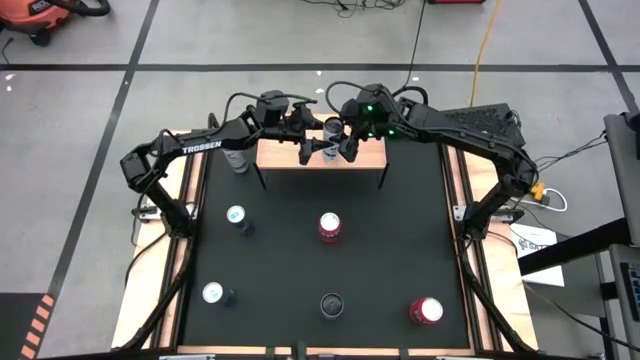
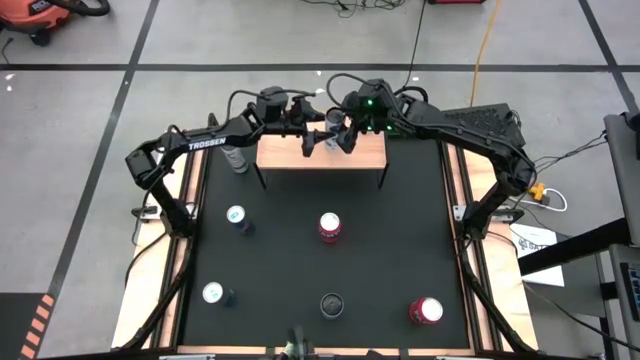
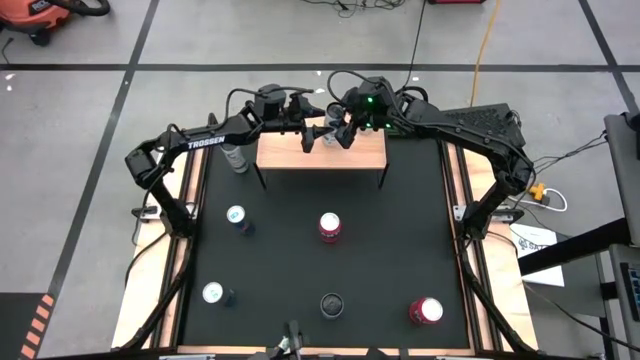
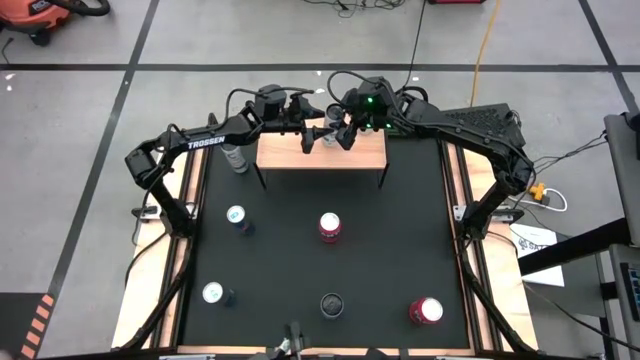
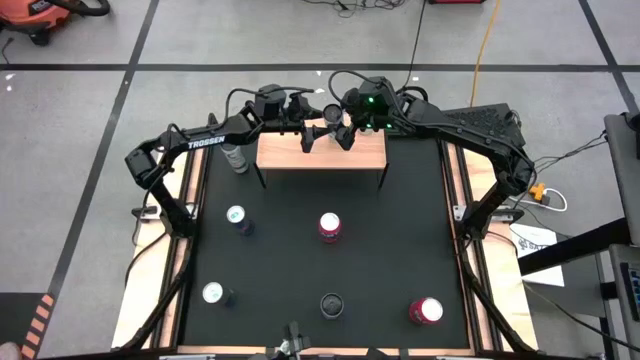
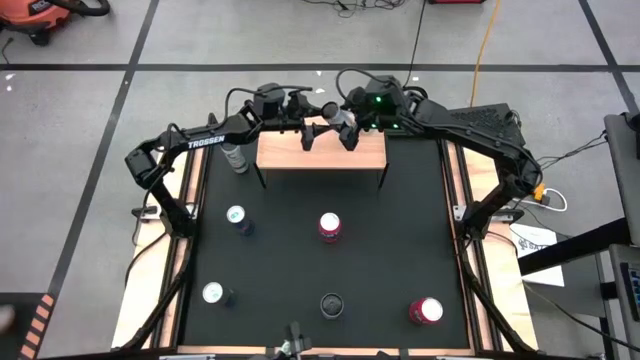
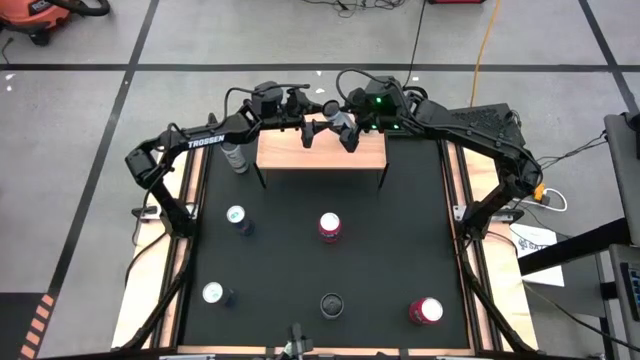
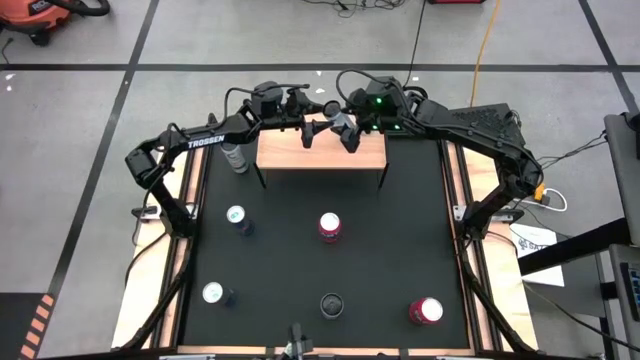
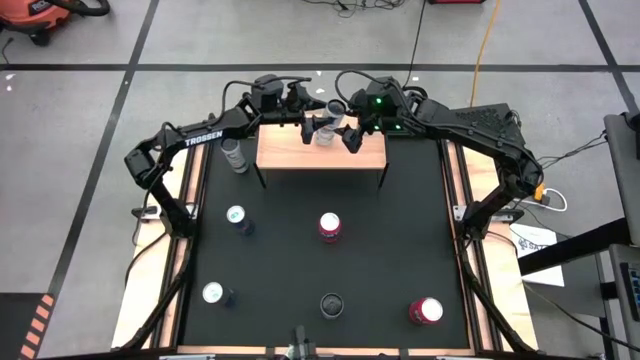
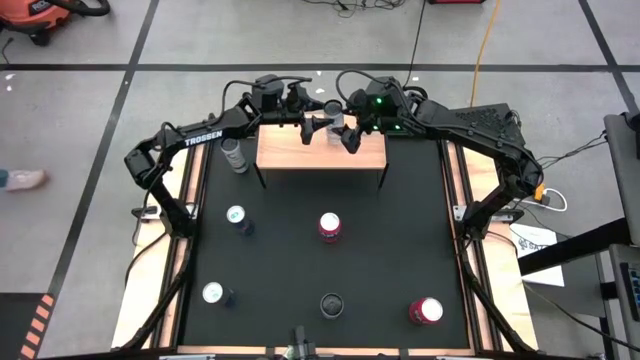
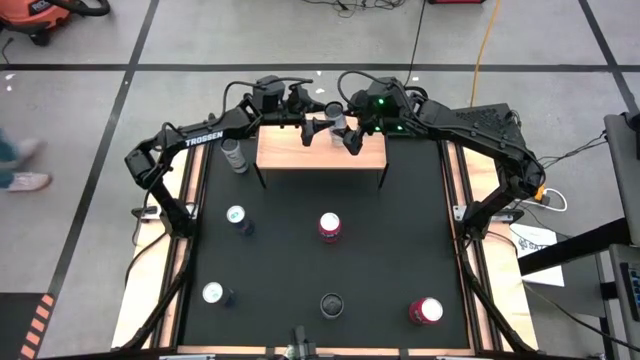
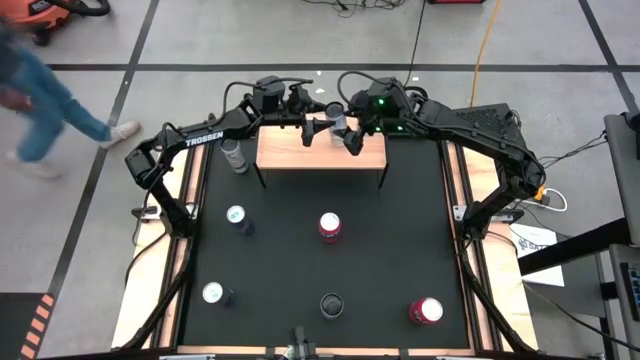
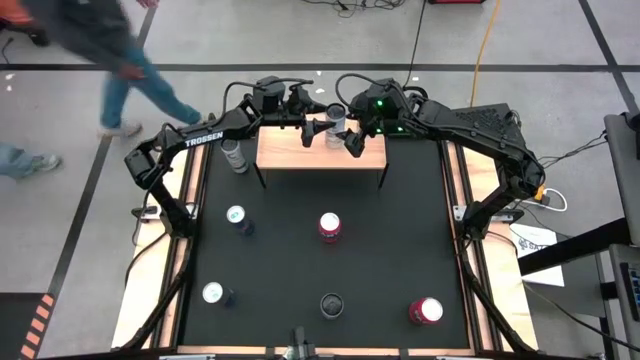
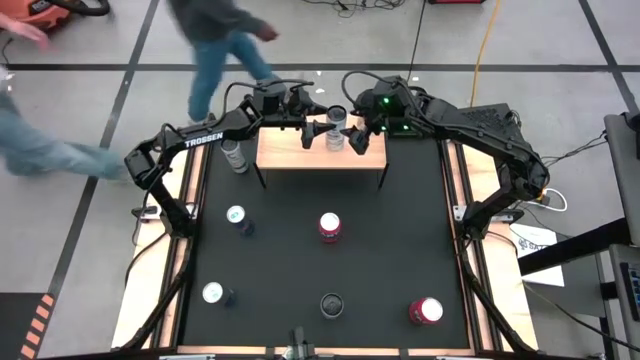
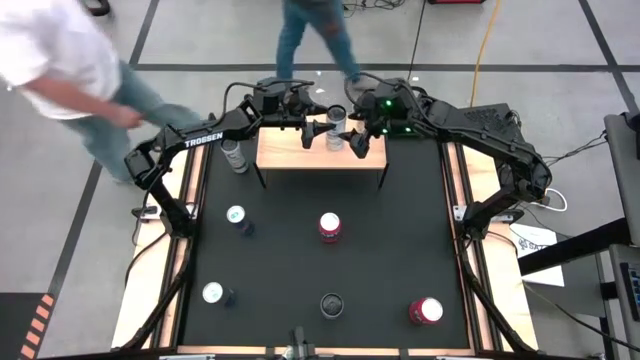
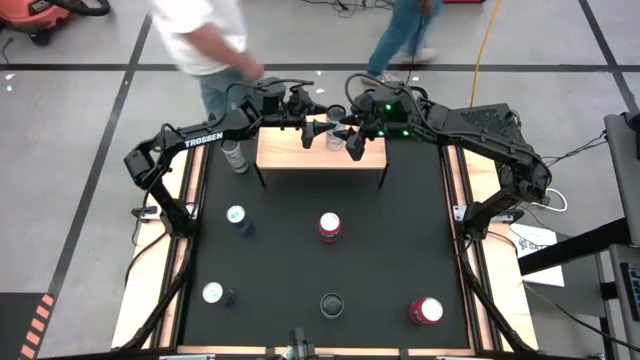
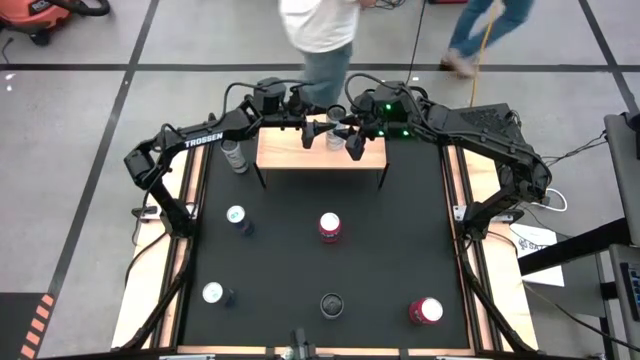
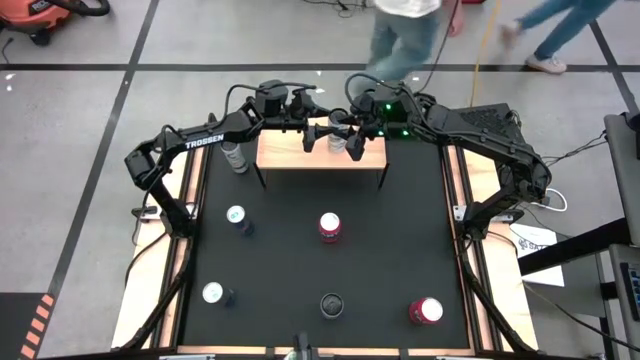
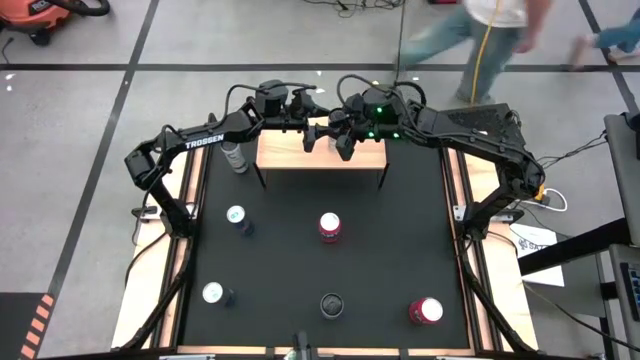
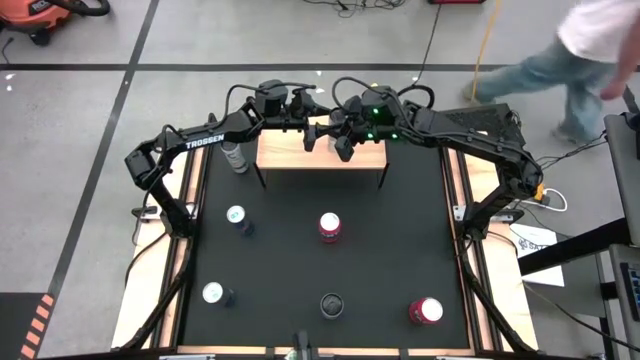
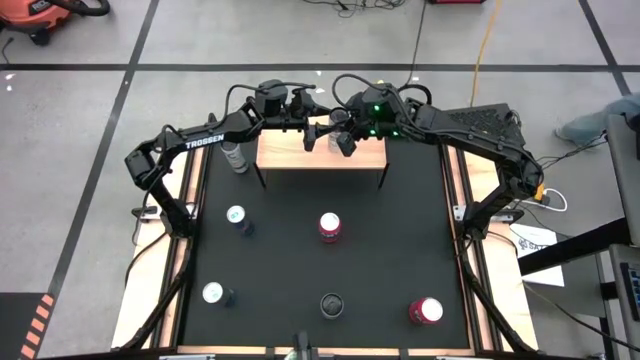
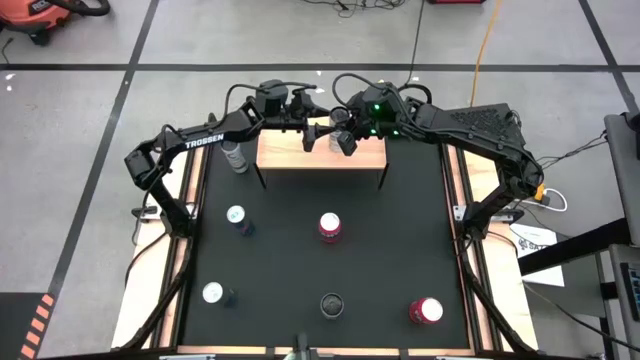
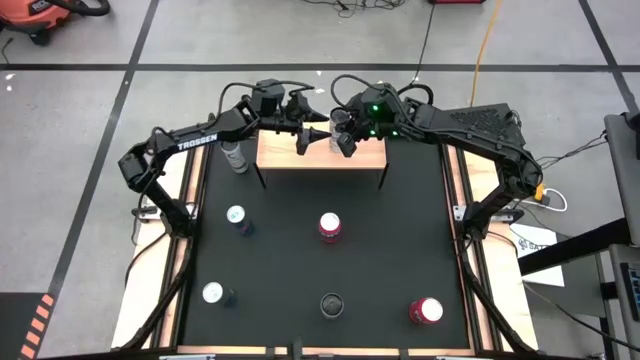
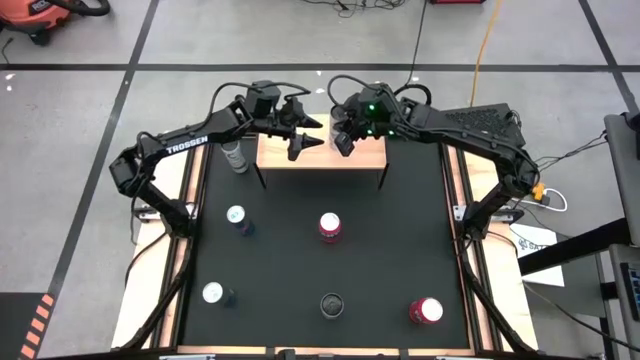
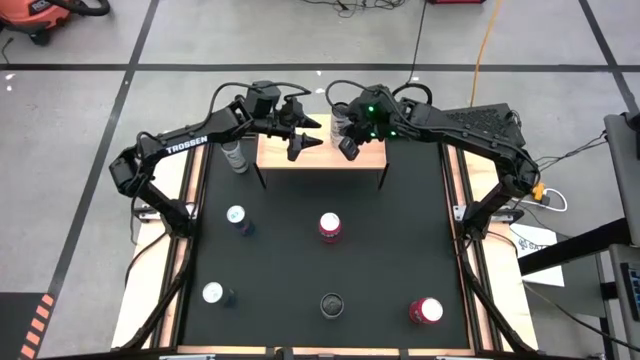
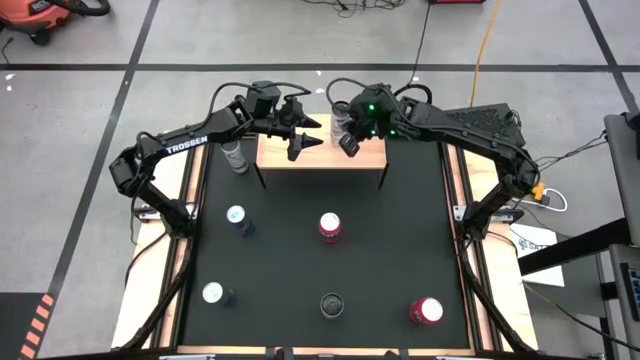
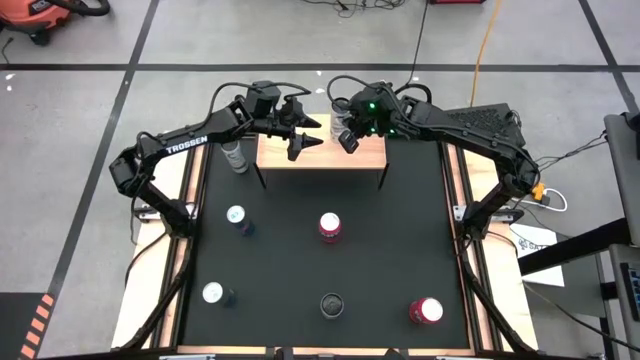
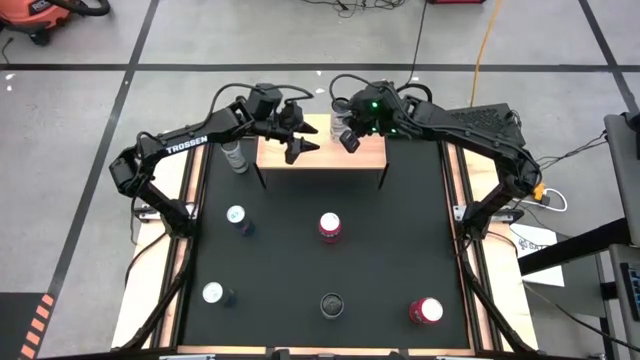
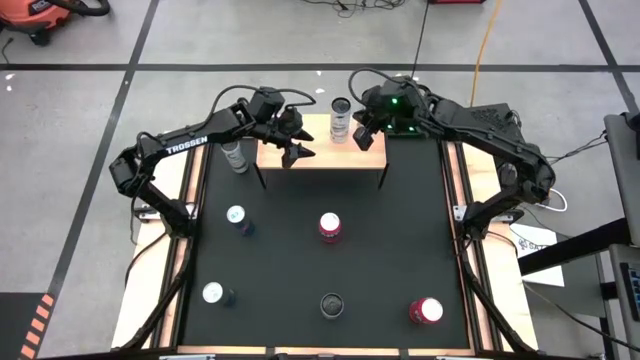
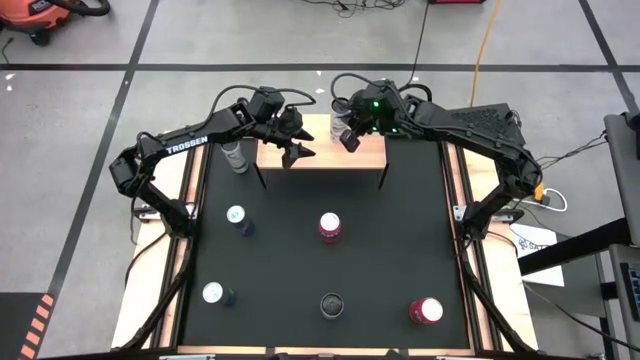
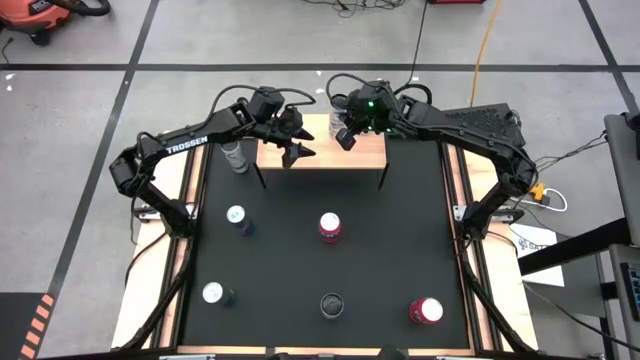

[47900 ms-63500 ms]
Task: Place canned beverage on shelf
Put the top white-blue soda can on the shelf

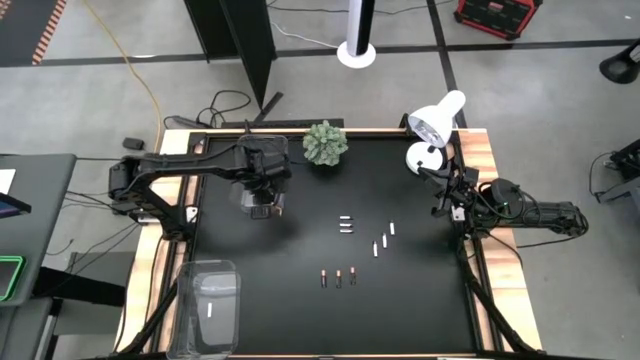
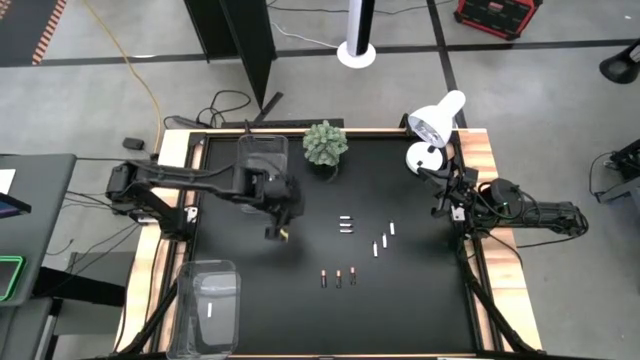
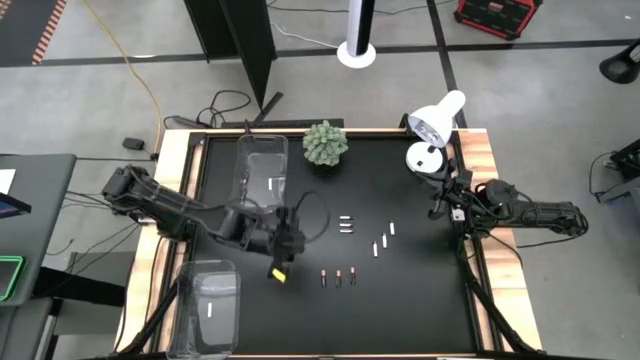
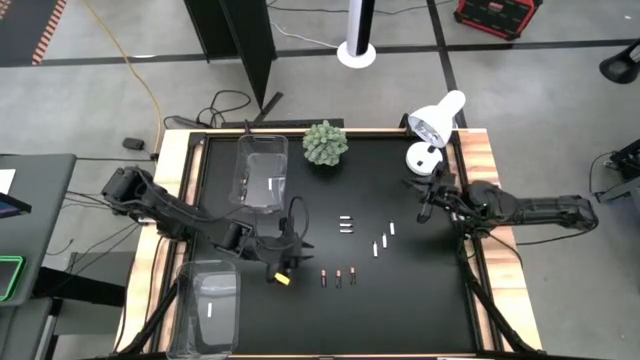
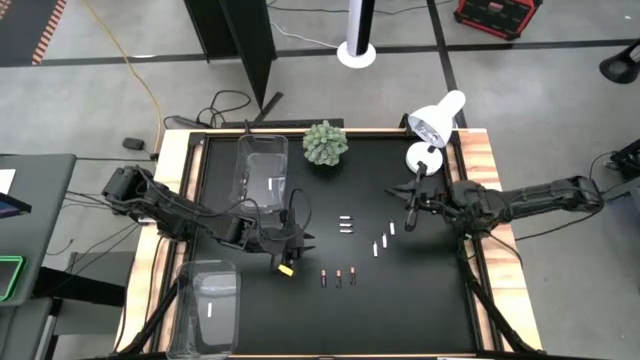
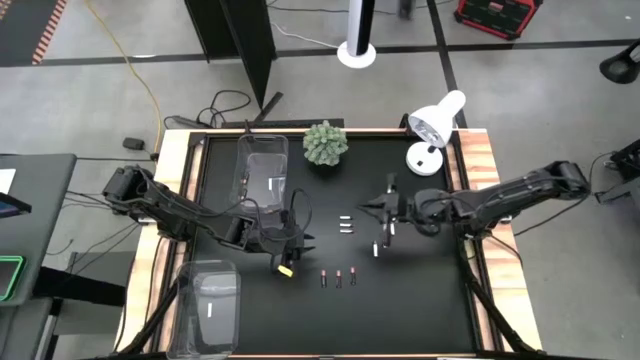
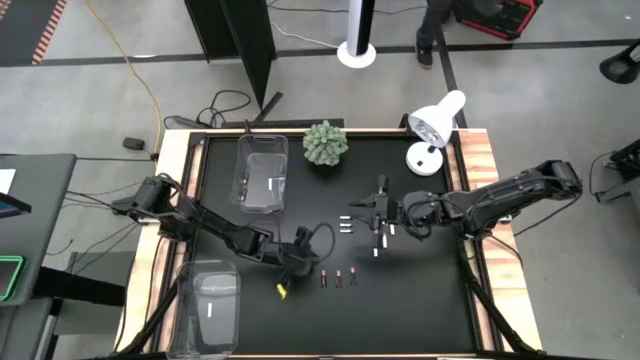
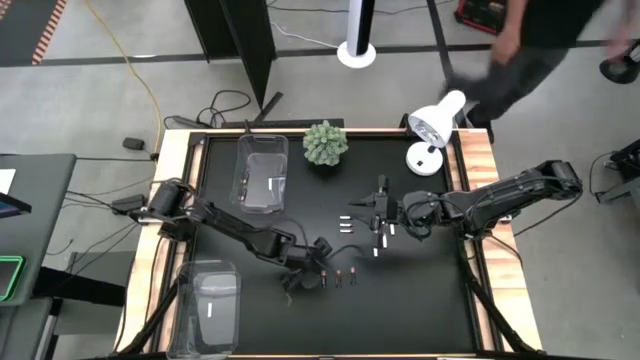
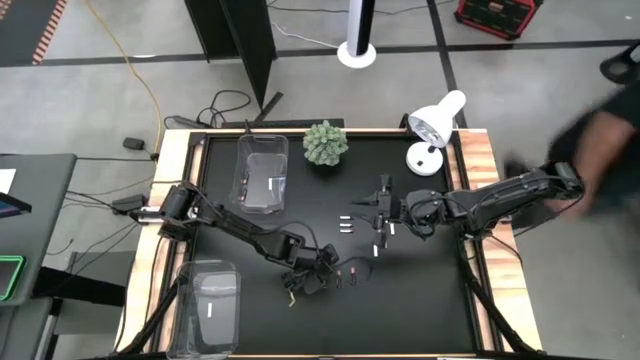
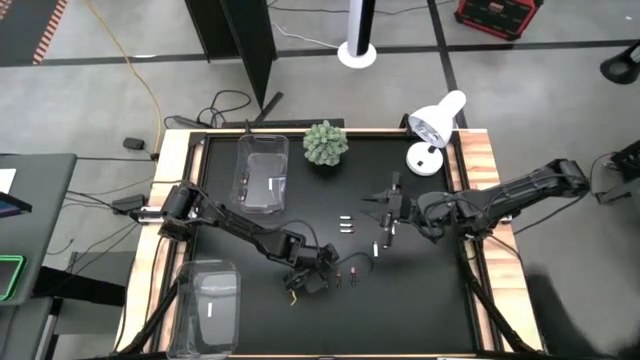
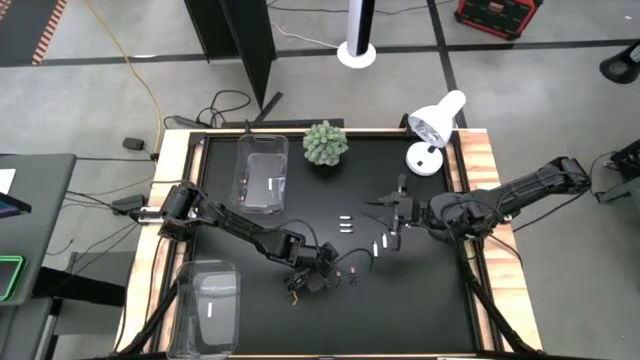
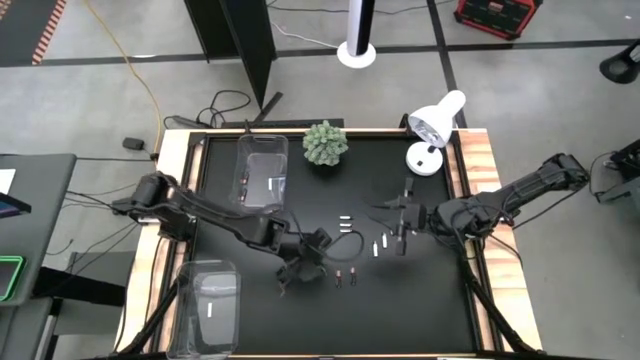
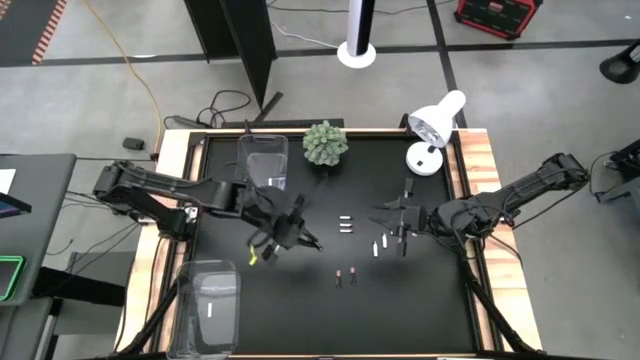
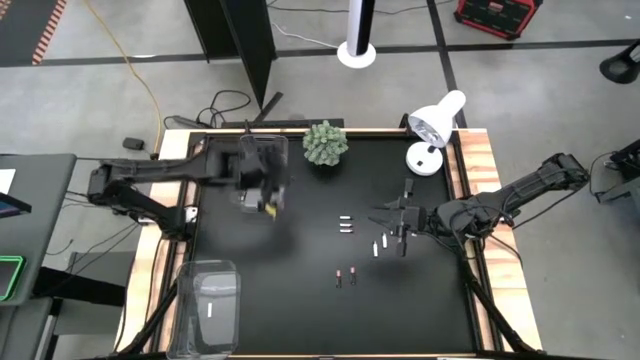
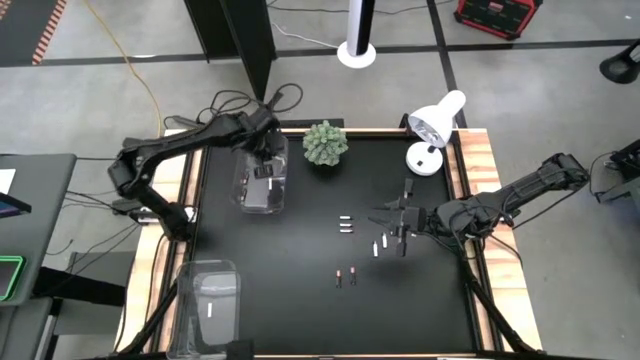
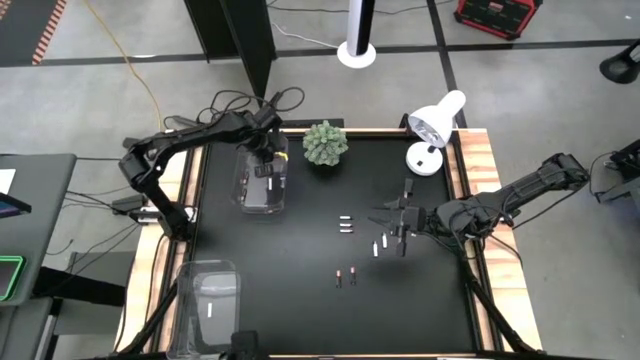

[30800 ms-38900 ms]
Task: Sort batteries
Put the copper and black battery into the top transparent bin
